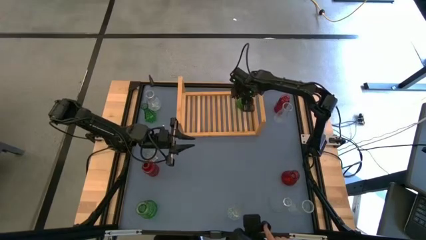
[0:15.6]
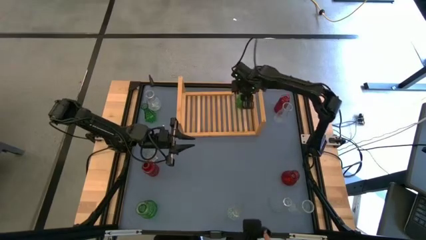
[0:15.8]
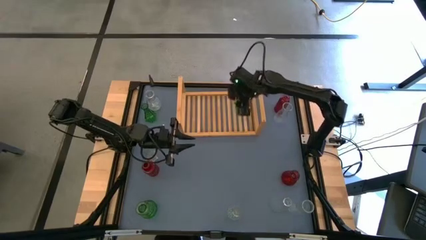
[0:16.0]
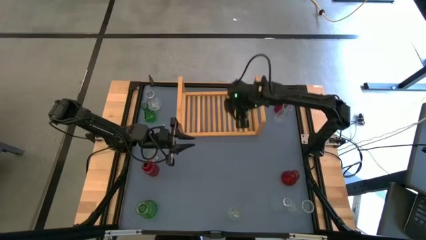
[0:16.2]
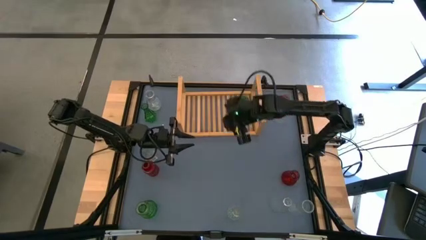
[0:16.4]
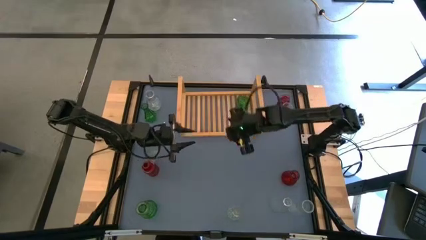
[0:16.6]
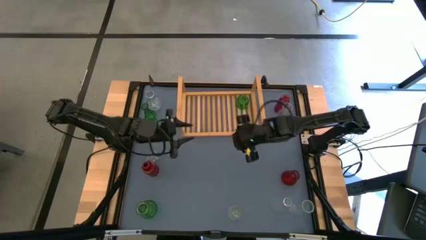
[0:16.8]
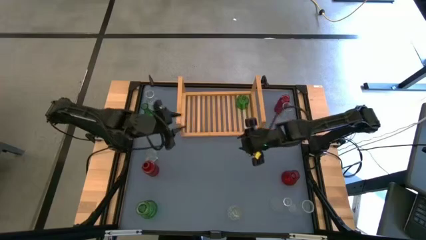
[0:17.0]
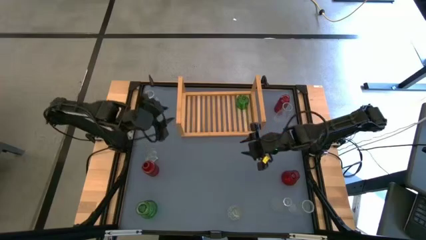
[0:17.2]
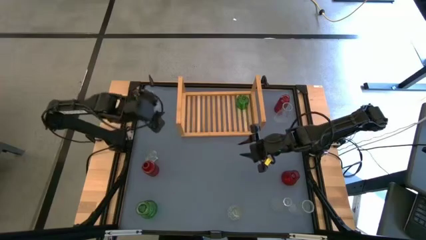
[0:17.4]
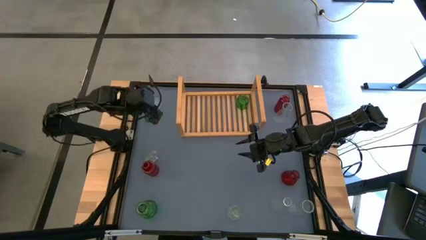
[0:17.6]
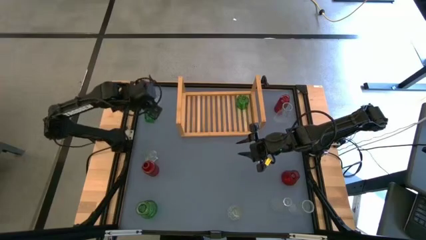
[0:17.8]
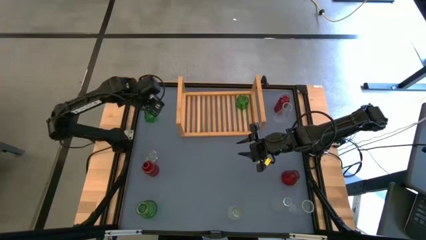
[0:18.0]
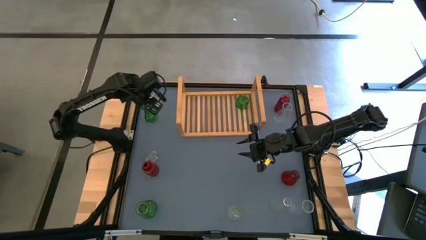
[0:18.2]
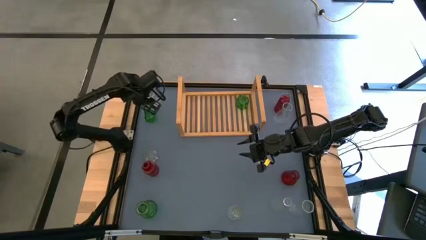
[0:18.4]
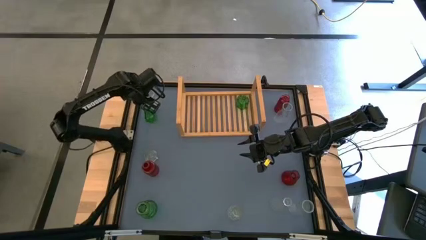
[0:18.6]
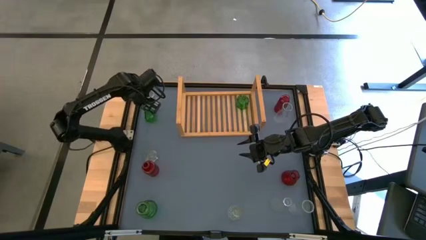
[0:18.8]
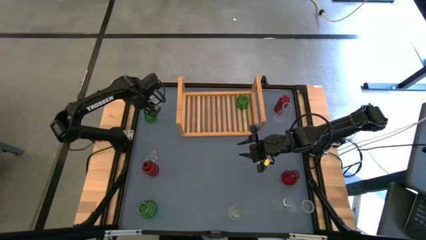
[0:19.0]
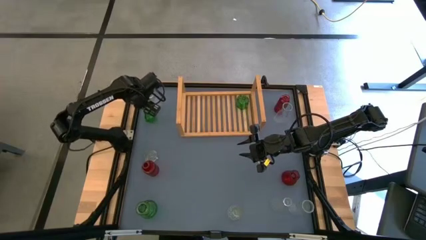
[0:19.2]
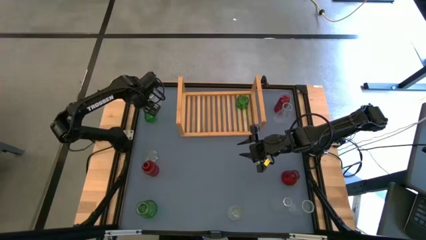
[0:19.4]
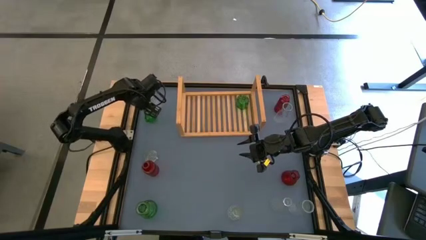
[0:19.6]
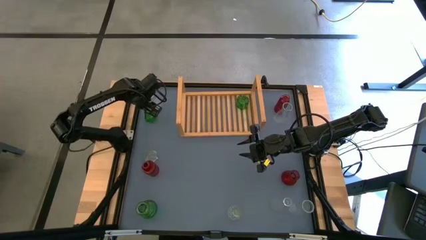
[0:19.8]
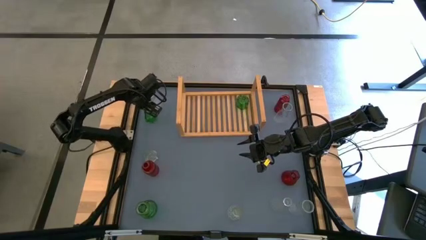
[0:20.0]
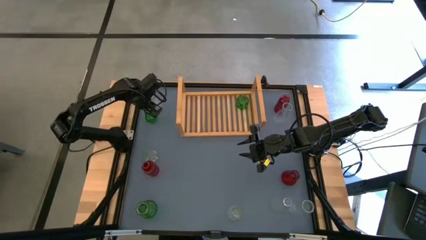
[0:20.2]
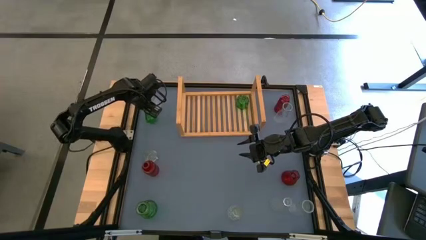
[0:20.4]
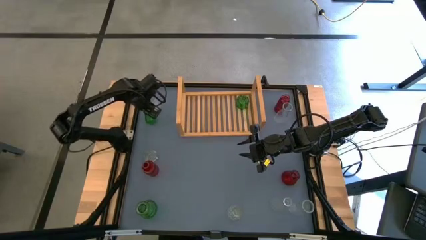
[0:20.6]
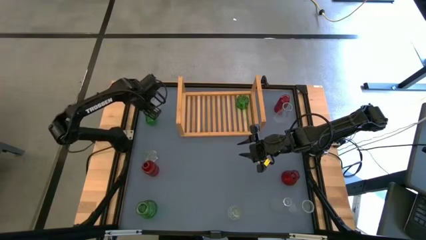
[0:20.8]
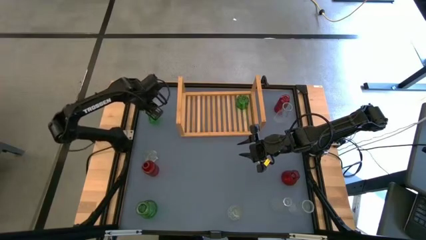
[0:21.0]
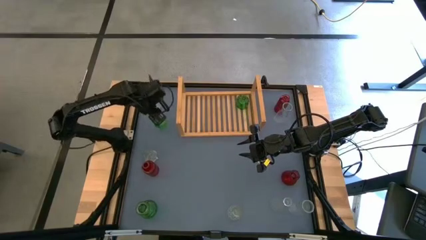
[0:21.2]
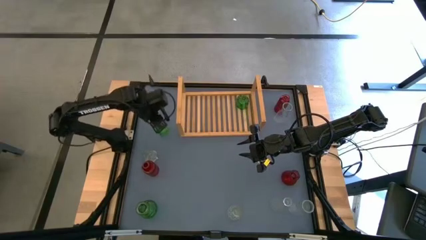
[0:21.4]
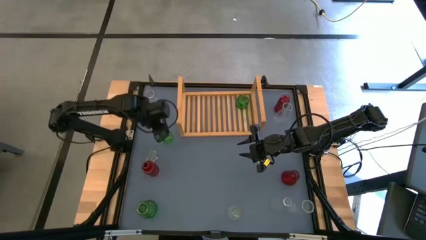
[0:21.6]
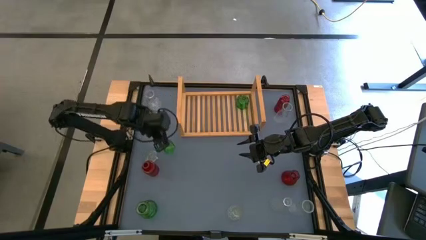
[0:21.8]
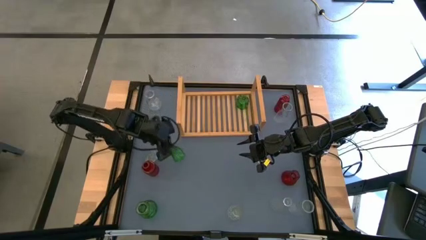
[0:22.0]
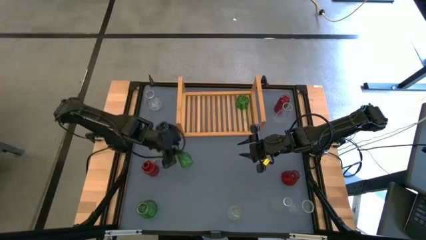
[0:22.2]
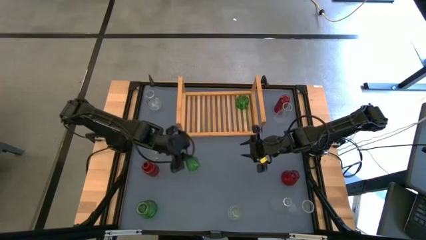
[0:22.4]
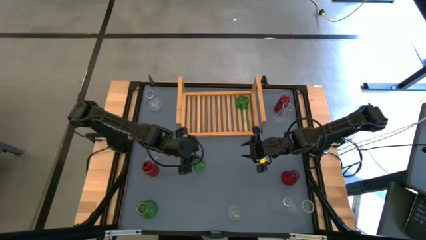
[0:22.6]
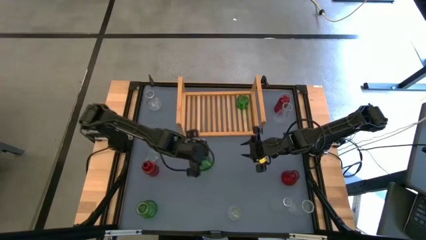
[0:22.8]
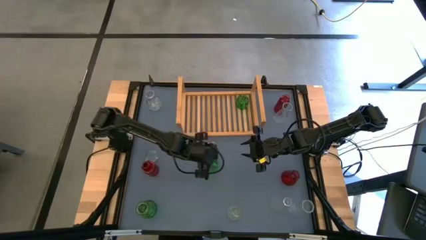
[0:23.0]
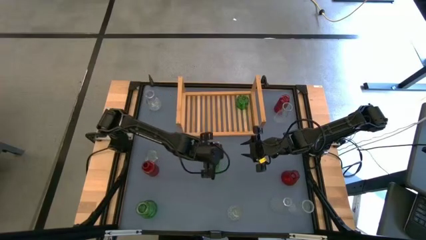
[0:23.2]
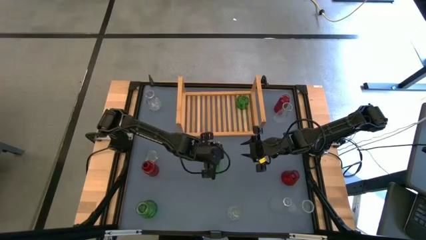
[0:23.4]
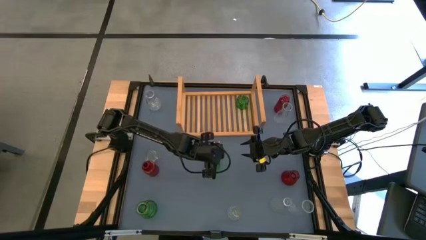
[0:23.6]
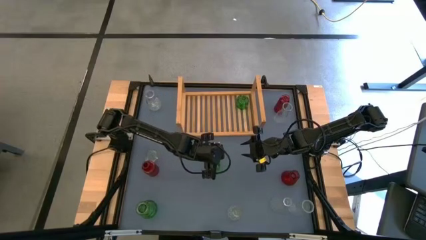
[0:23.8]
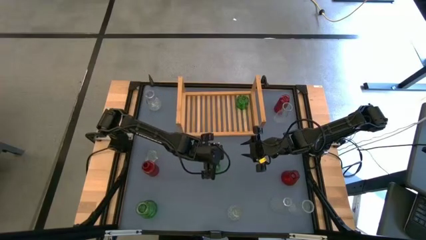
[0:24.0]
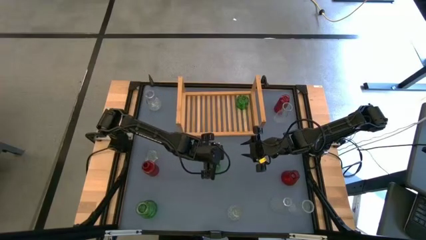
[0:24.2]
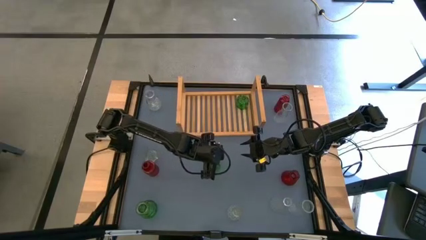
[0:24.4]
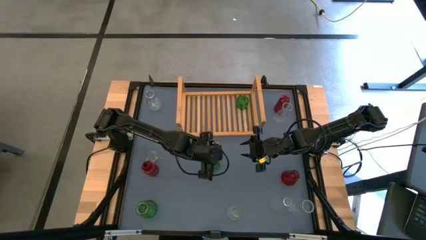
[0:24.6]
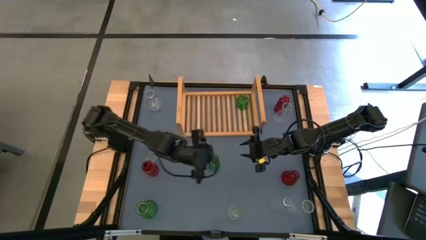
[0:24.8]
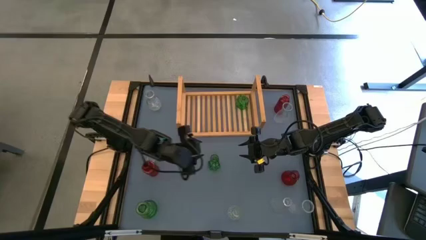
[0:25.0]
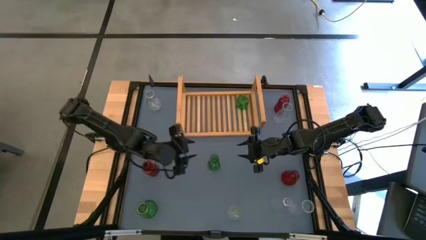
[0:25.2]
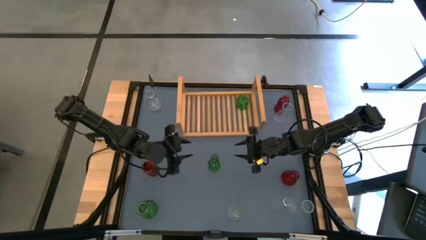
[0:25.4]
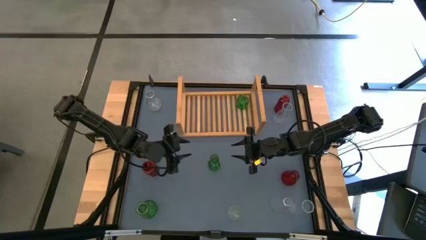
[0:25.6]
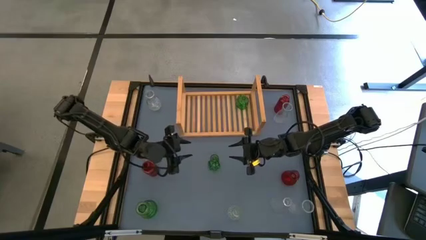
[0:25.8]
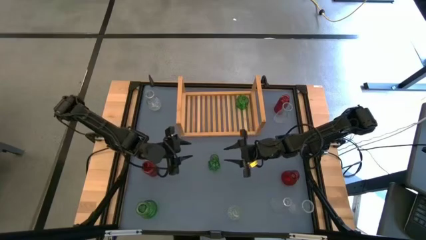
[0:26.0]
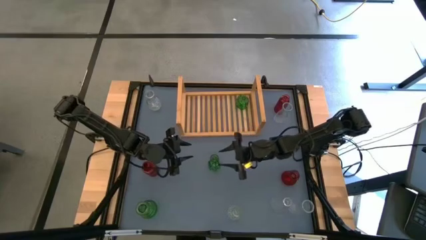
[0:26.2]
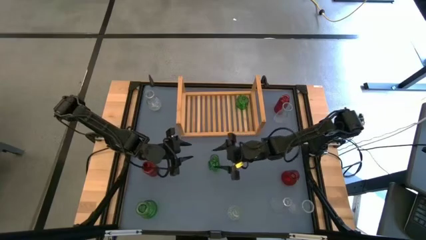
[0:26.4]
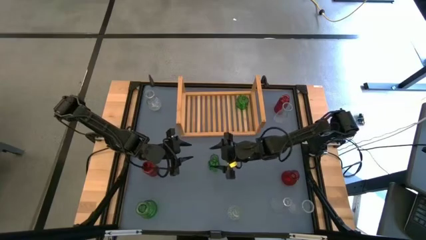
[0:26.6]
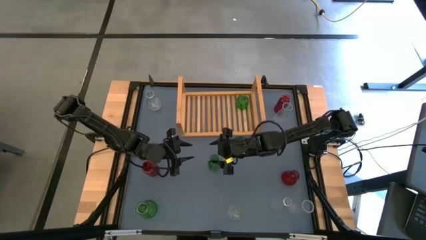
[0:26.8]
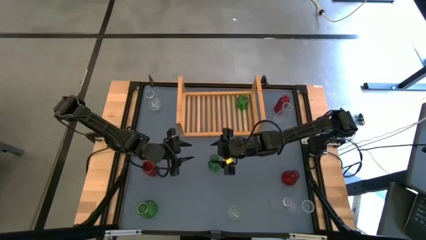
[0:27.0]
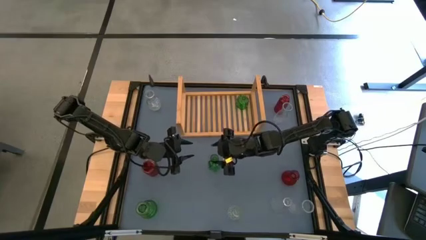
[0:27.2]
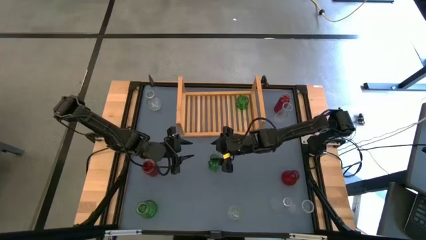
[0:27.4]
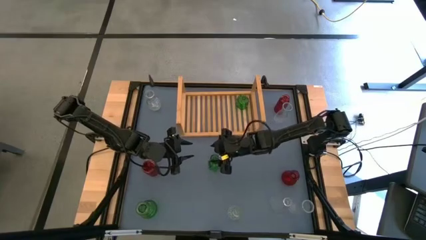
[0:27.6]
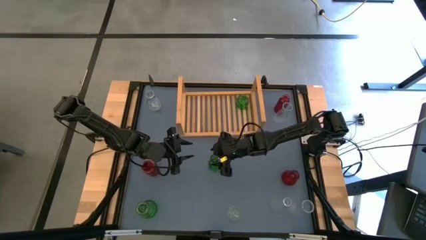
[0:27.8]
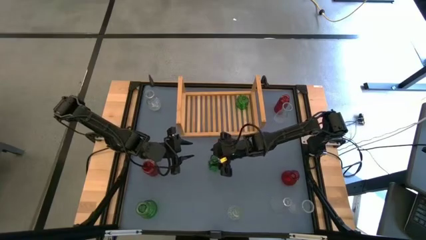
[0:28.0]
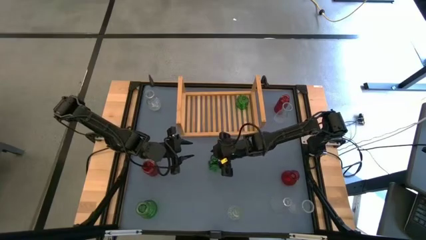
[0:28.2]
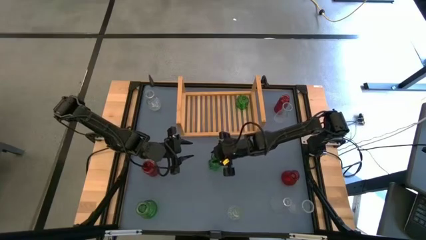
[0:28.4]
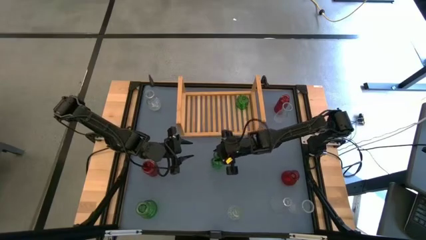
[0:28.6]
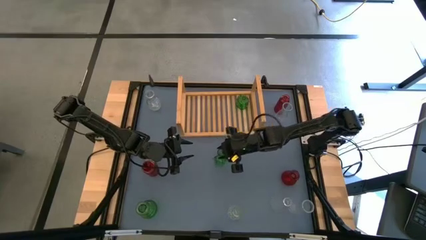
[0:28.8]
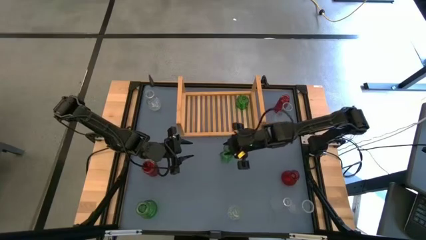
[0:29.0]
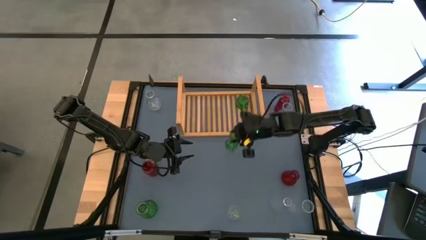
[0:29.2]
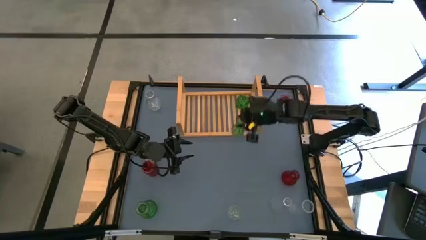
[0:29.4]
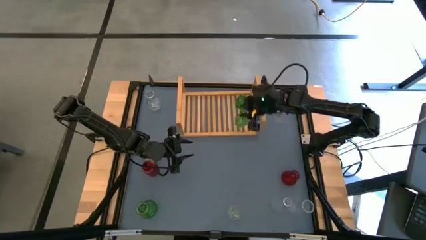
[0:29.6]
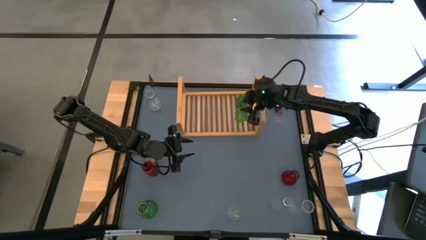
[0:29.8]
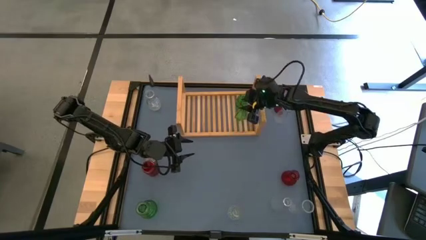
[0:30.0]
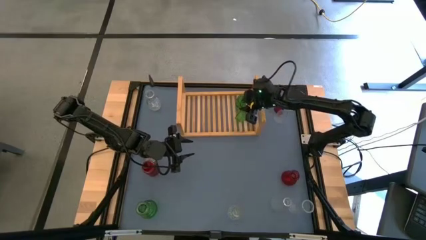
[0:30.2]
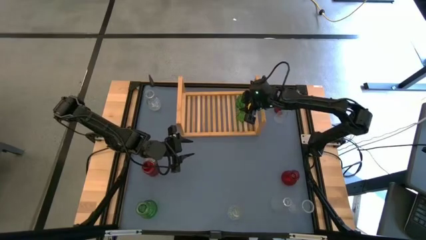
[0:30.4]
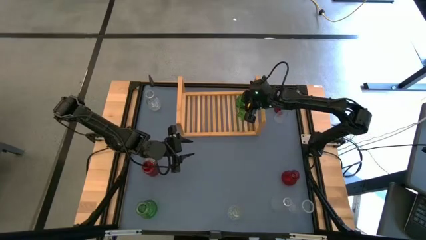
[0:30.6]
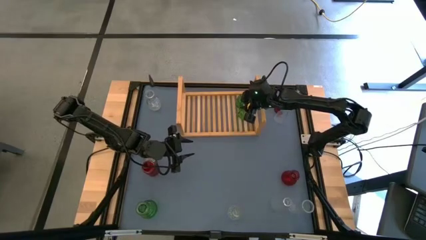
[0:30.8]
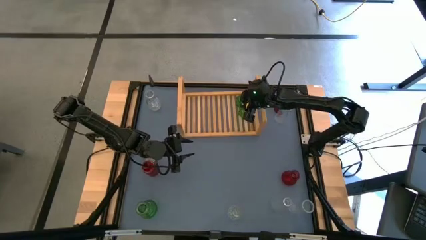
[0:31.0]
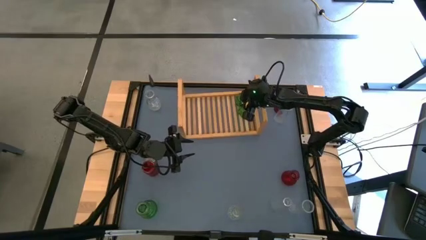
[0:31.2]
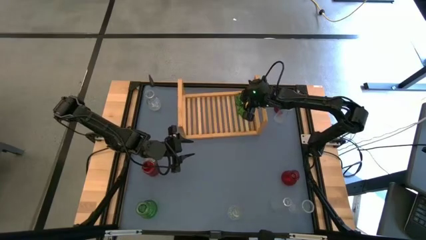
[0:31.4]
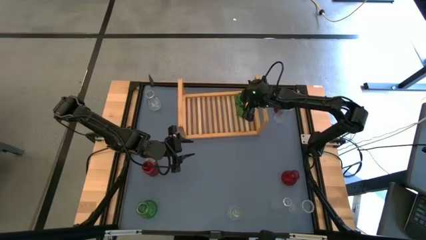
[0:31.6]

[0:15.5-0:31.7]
Task: sort vases onto shelf
Put the green vase on the shelf aligned with the other green vase
